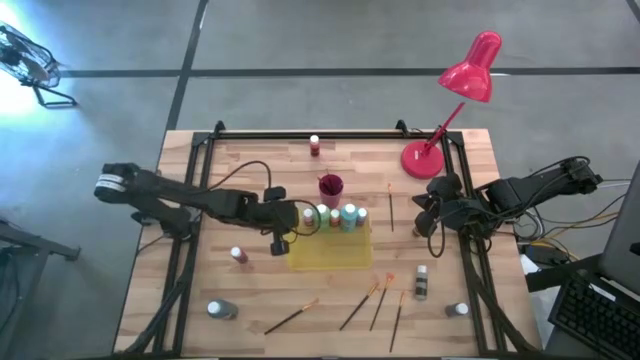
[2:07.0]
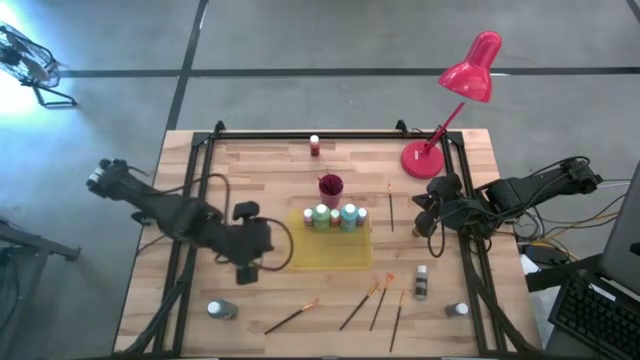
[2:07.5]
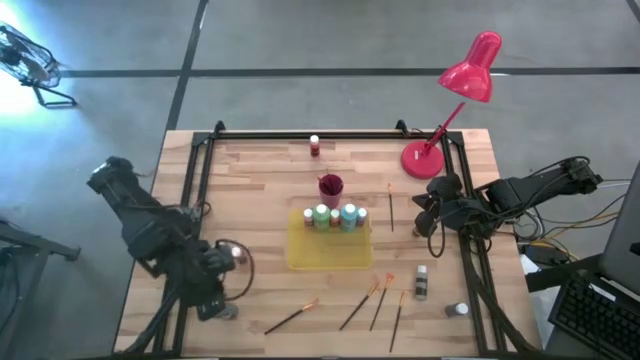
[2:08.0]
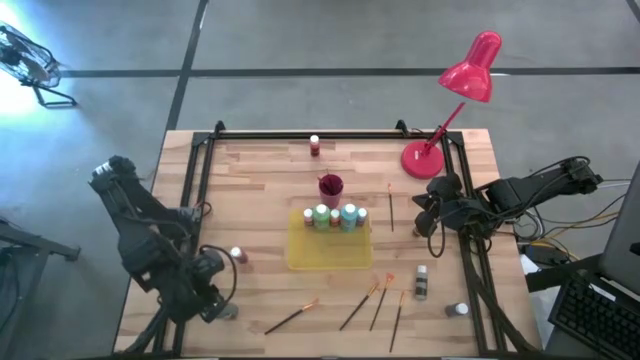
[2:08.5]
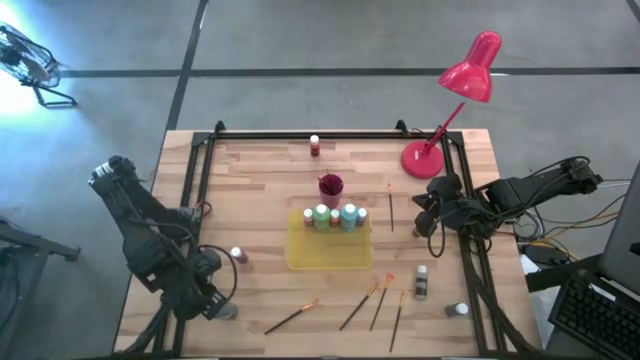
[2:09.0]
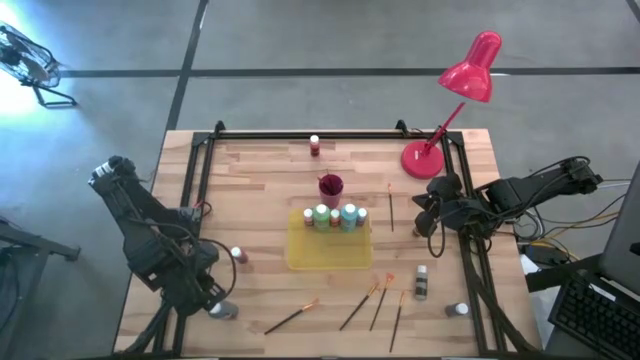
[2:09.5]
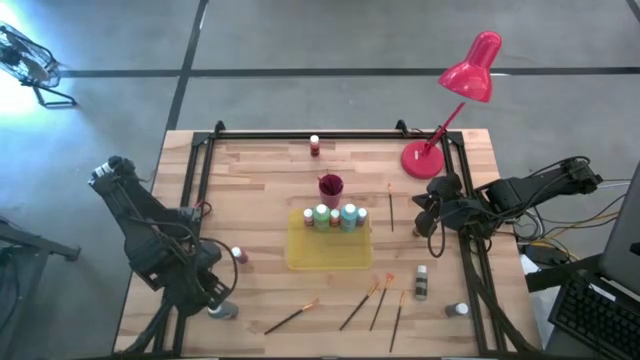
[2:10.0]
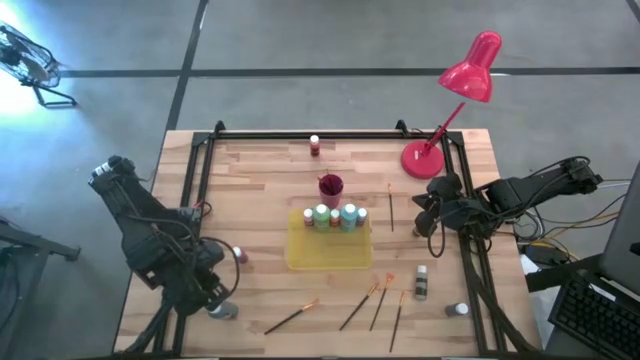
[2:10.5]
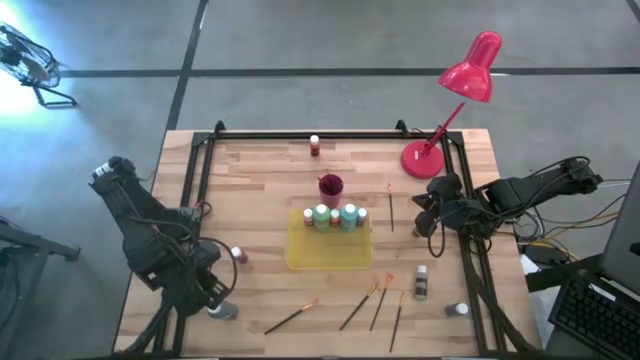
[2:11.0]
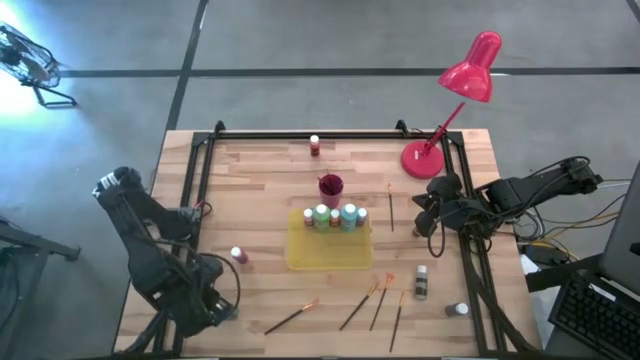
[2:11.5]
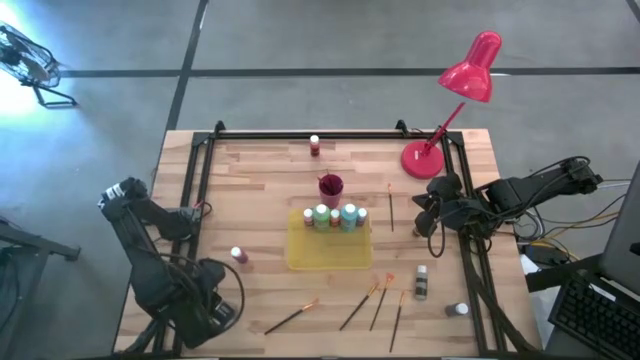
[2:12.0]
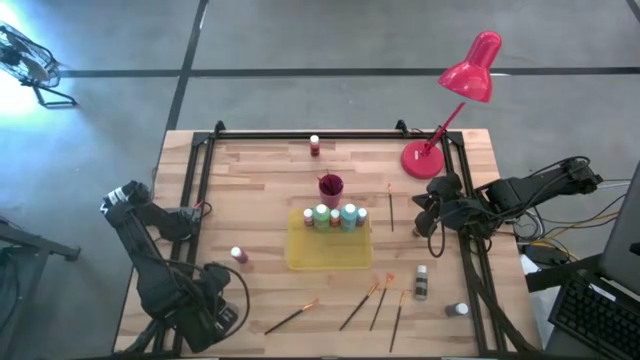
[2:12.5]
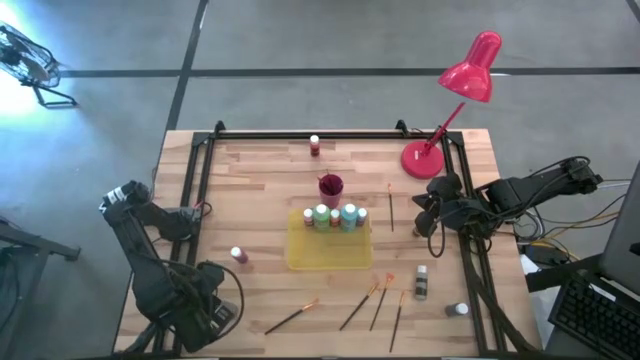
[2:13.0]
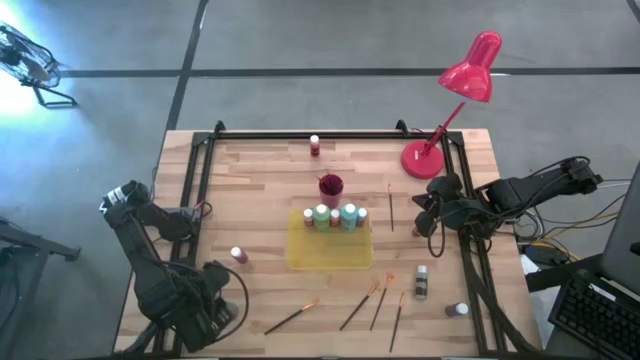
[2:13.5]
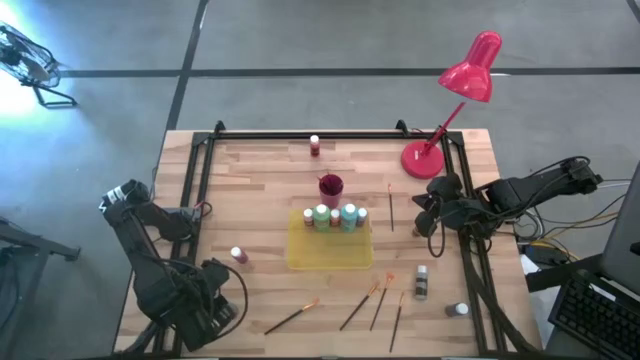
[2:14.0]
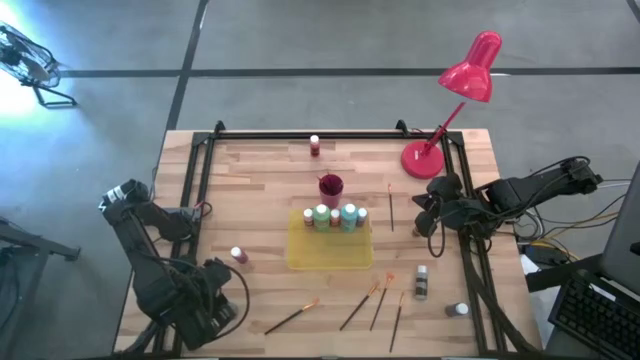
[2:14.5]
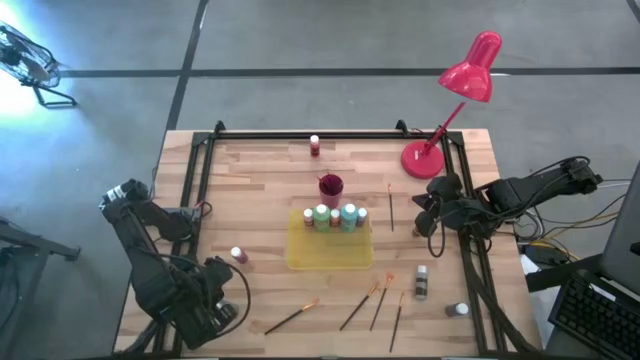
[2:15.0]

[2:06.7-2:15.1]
Task: Pick & Place Paint Supplies
Put the large blue paint bottle into the yellow bin

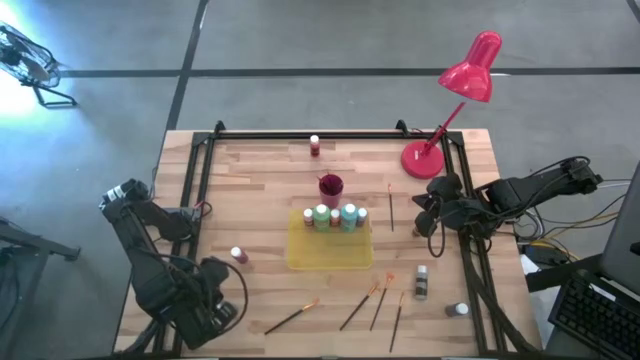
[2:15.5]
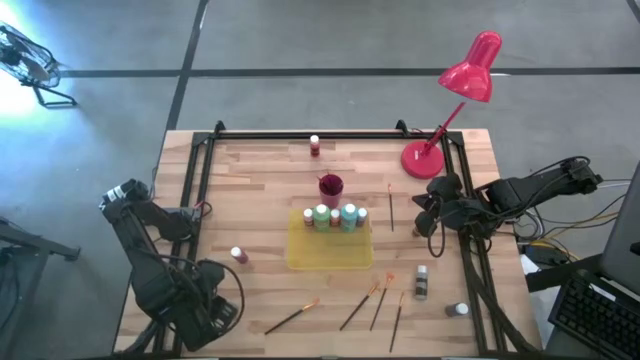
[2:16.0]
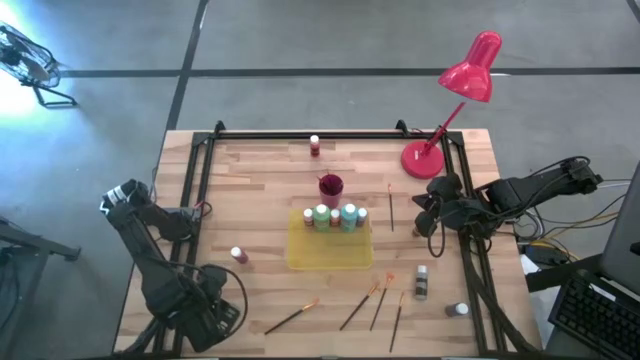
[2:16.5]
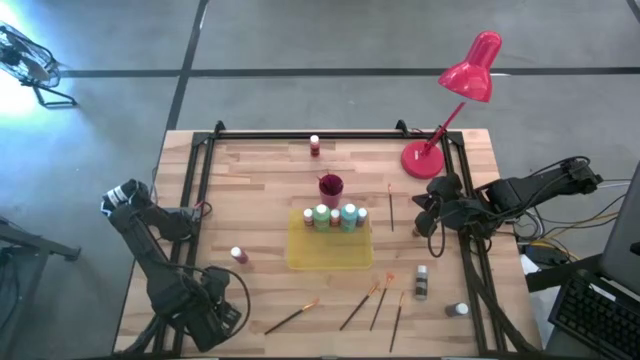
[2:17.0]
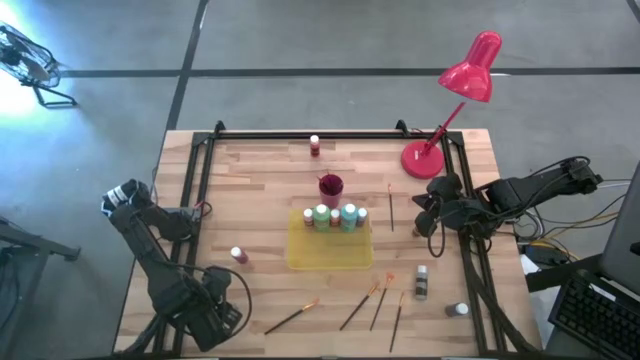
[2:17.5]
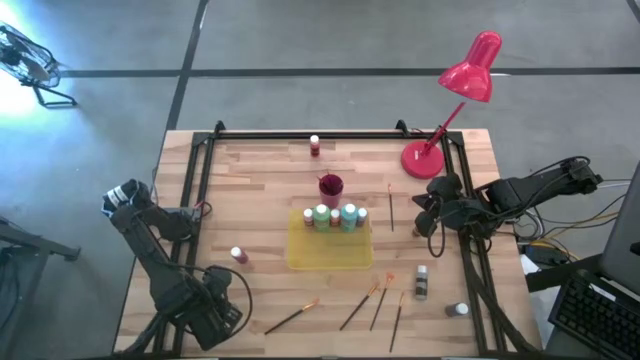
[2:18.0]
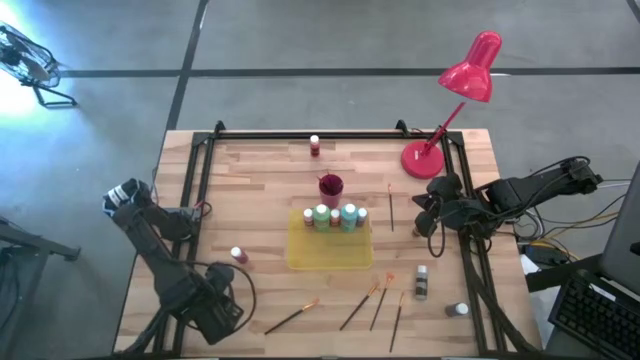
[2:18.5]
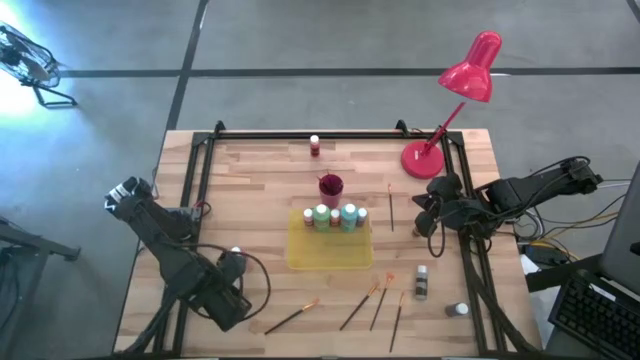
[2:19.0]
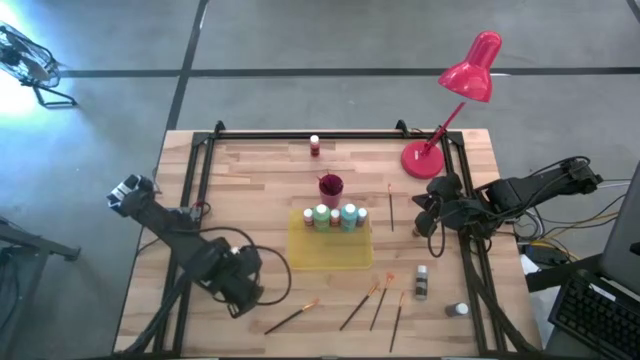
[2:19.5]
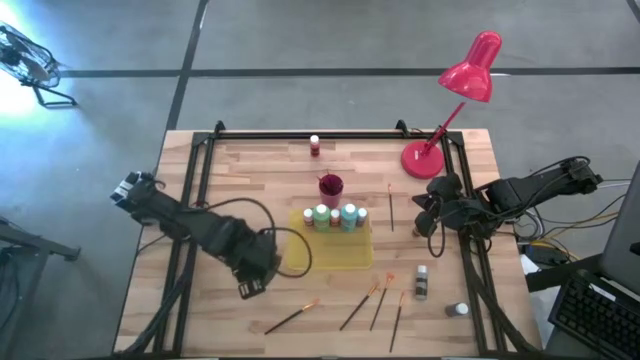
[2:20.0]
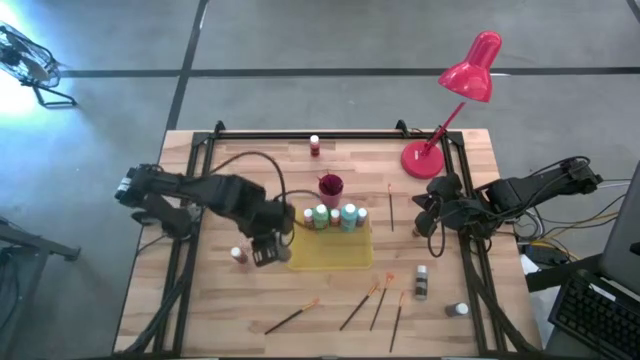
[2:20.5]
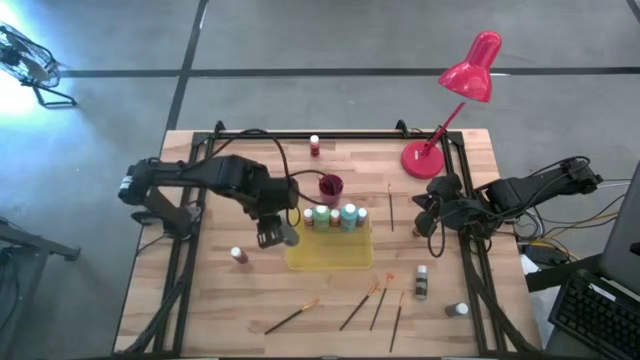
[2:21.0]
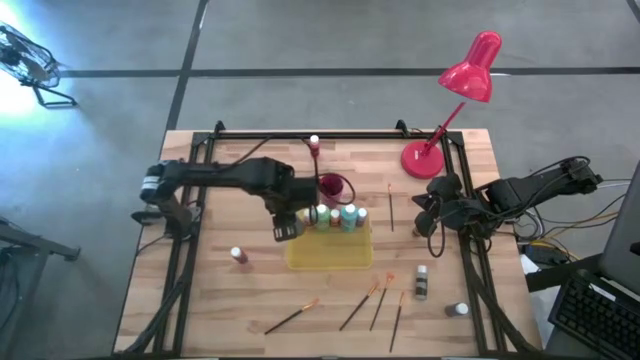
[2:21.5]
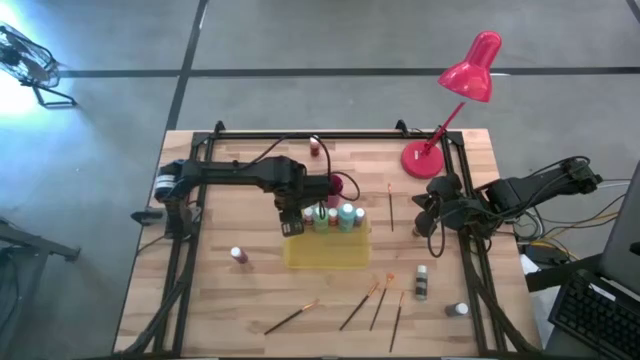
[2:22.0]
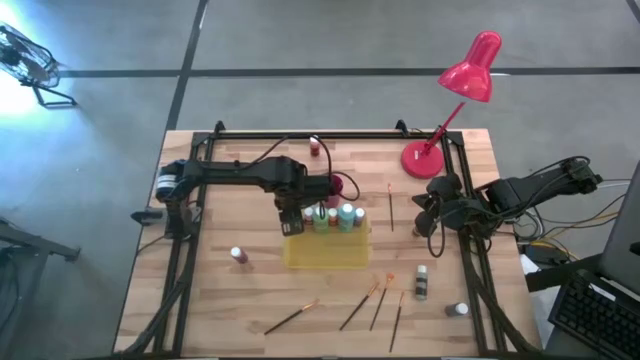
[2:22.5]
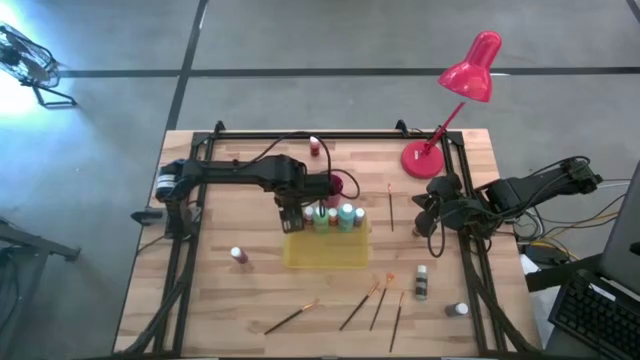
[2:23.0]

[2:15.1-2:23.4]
Put the large blue paint bottle into the yellow bin

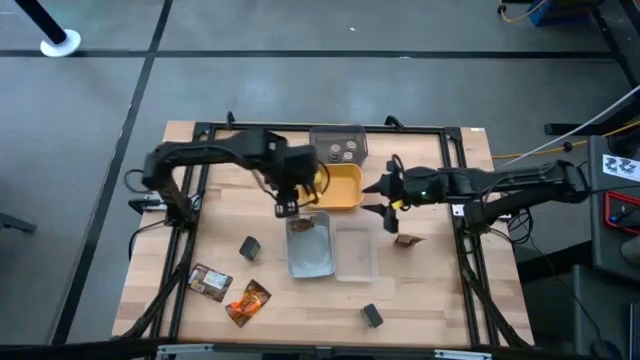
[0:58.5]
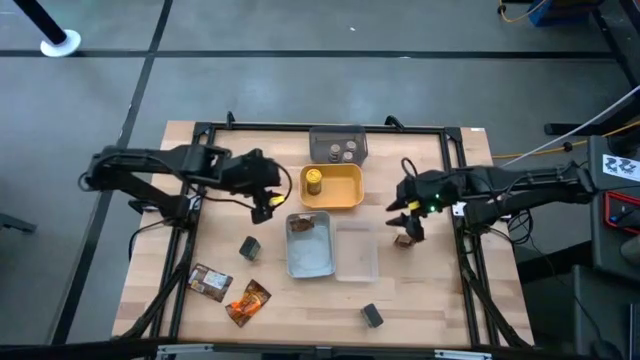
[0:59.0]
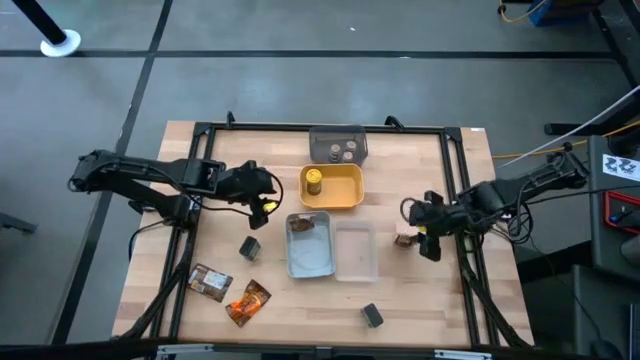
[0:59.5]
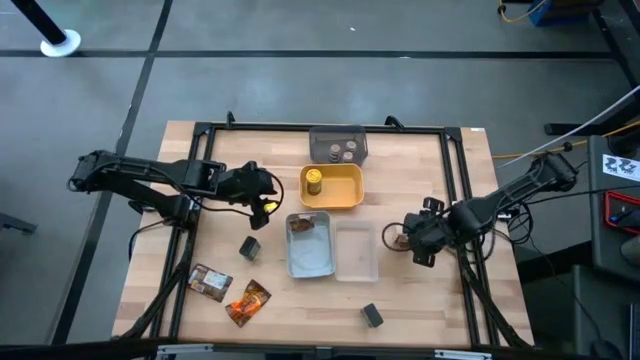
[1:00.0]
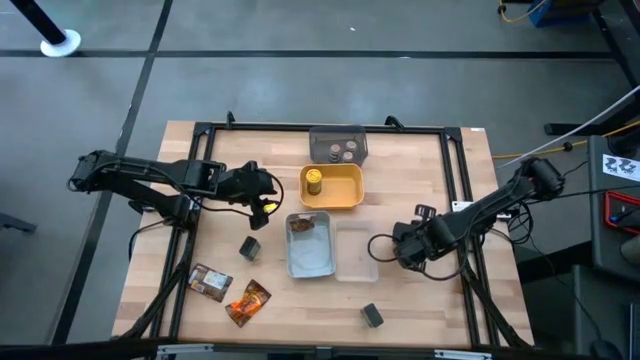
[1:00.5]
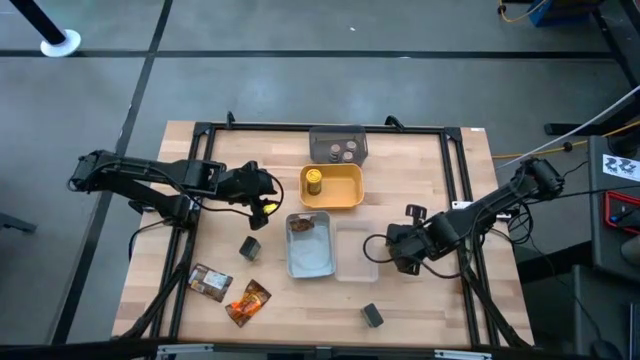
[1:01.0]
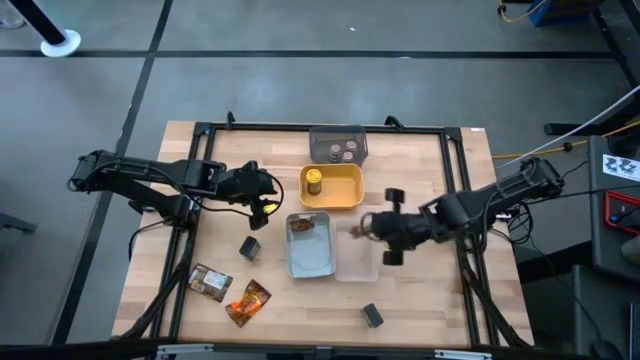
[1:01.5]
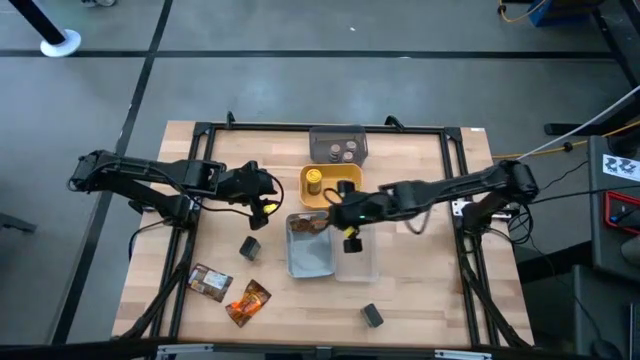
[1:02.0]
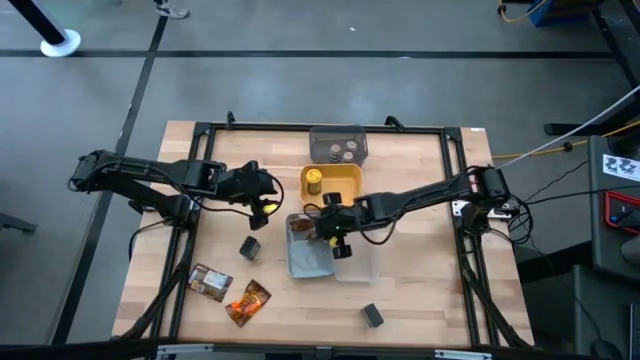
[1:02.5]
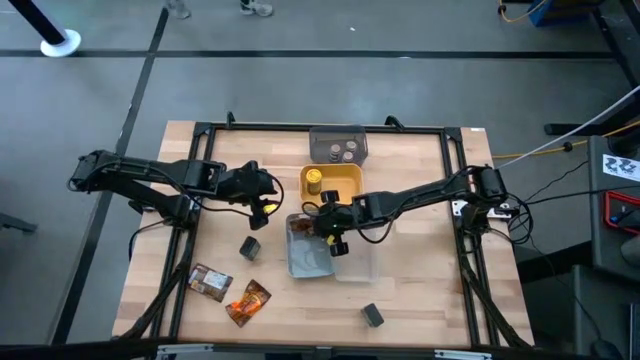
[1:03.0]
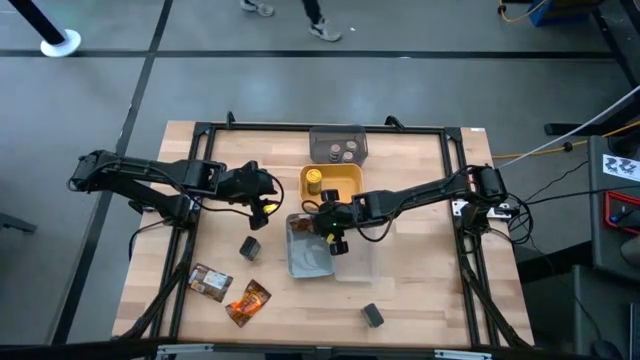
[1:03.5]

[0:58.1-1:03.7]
Task: Sort spices by type
Put the top brown seasoning pack into the gray bin
